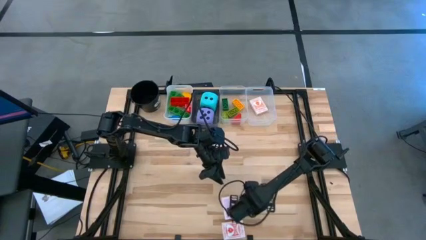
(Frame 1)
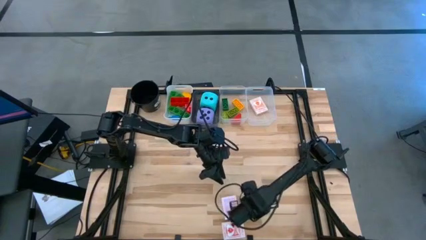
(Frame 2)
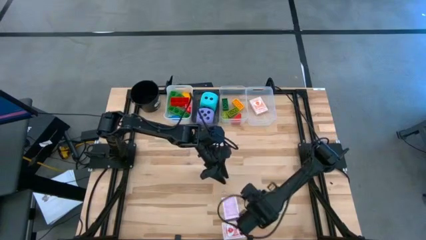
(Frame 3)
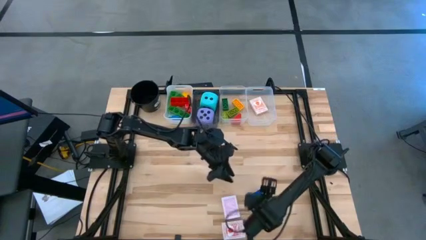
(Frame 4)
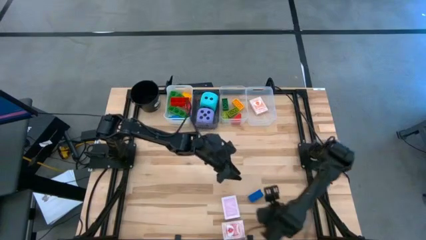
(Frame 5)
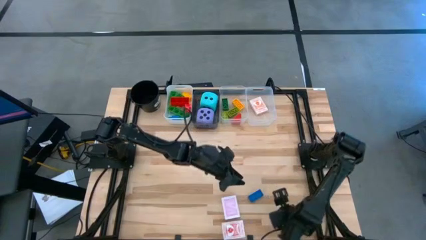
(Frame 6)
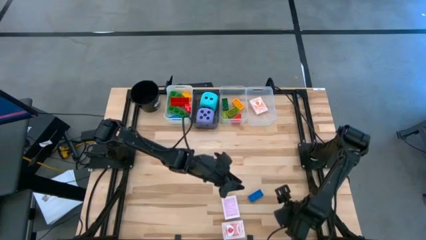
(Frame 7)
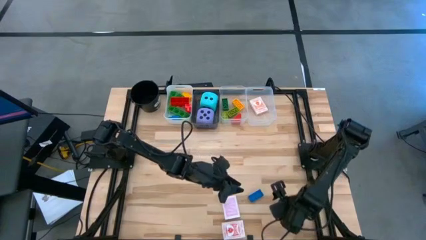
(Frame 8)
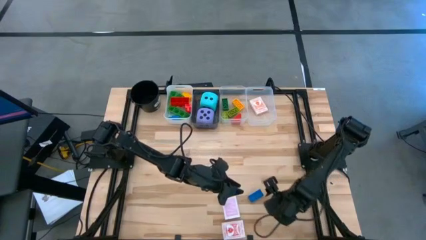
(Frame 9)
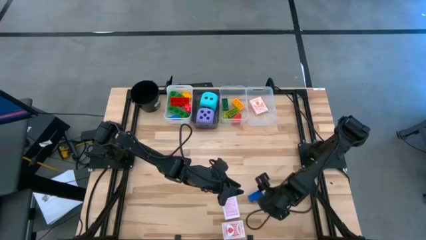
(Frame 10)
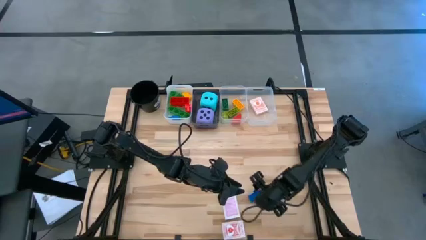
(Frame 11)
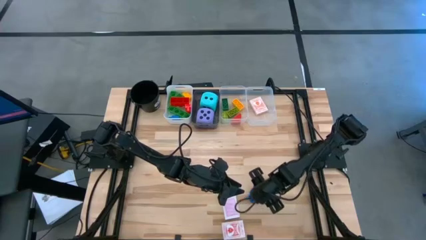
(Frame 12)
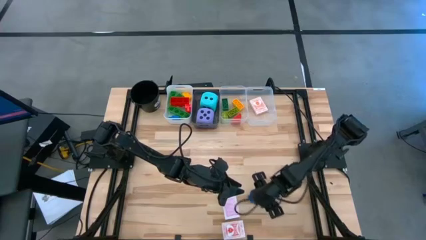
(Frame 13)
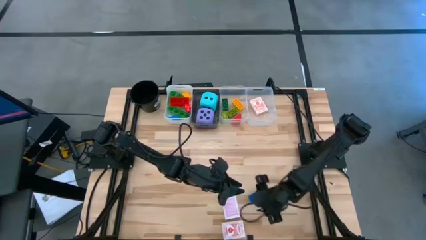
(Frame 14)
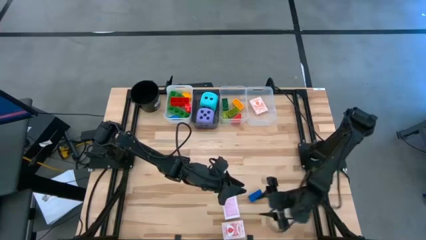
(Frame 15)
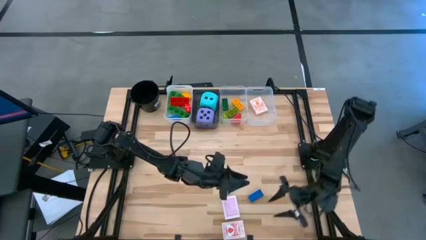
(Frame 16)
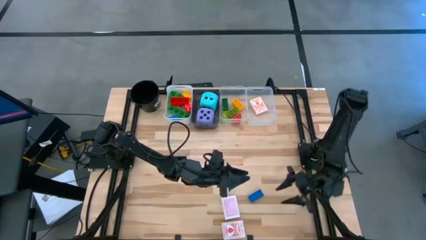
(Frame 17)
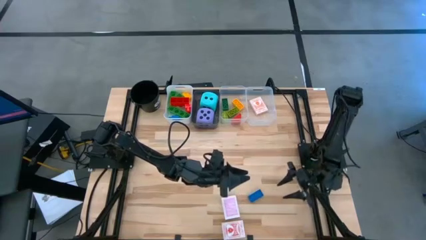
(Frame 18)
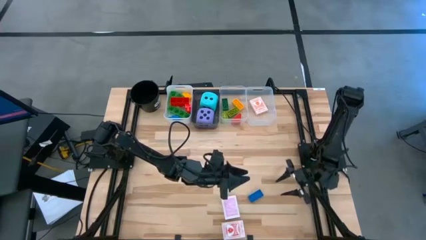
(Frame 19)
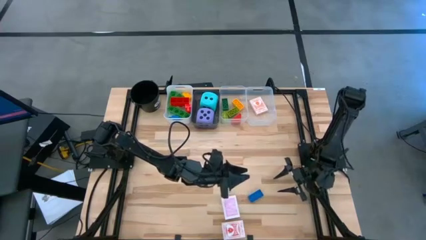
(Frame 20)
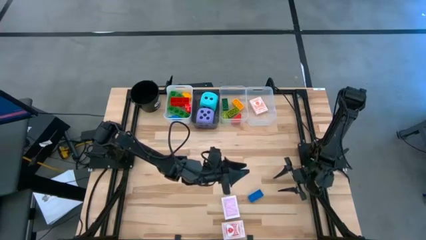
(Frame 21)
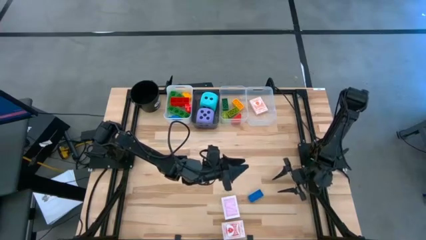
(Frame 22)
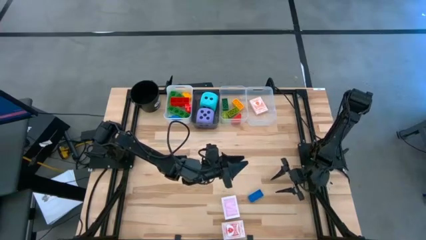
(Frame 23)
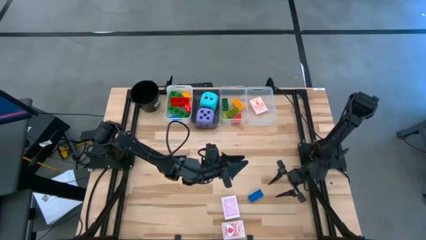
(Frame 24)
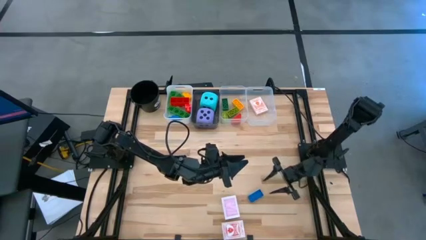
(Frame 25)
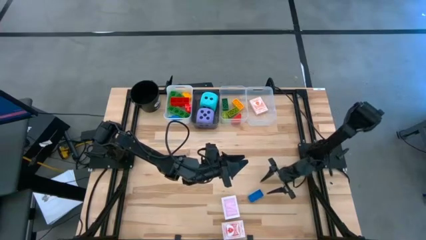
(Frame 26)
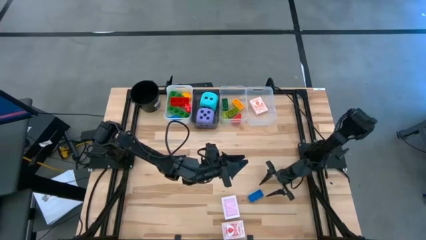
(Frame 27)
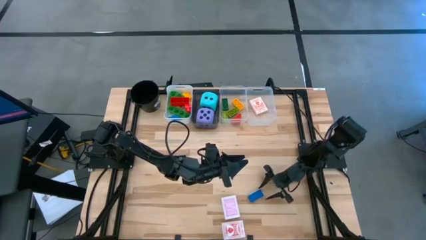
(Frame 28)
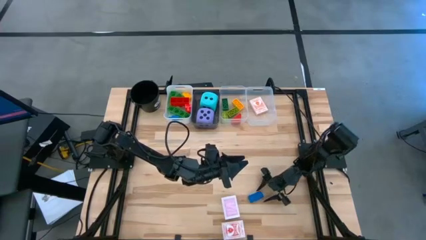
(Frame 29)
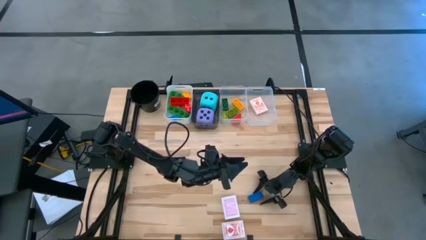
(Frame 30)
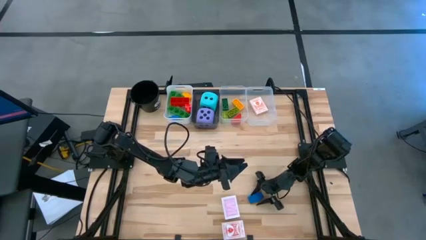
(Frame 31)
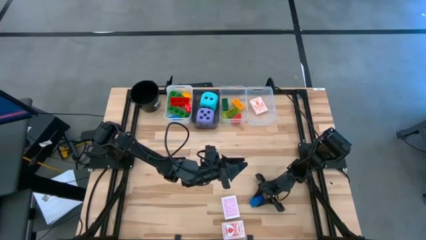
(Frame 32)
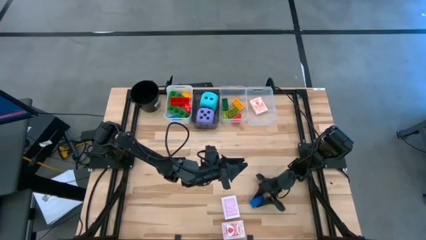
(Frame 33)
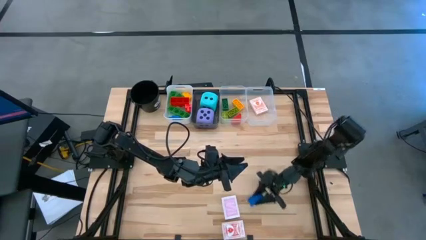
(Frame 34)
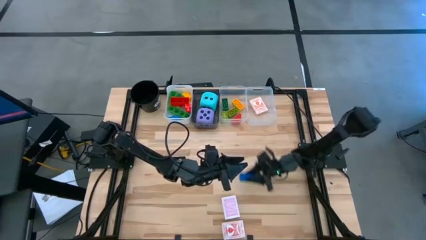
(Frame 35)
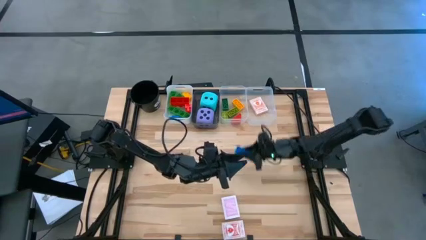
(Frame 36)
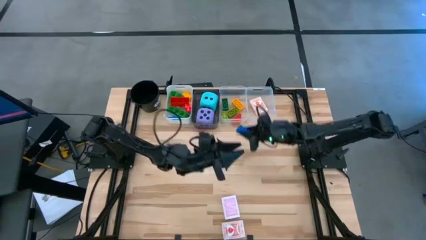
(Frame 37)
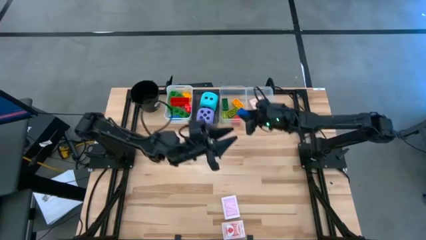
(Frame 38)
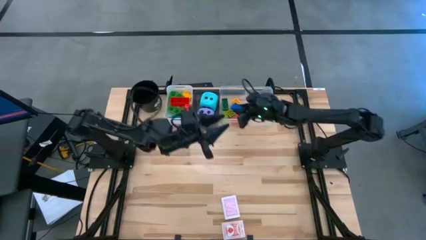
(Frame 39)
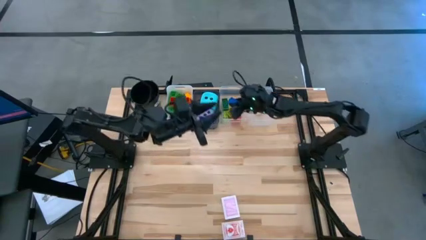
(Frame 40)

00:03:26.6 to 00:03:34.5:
Task: Pick & Place Toys
Put the small blue 8-stud game piece into the left transparent bin

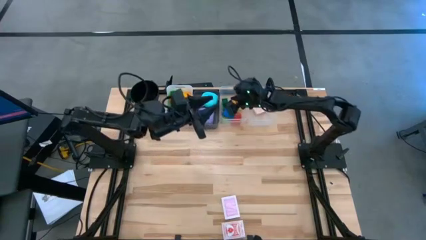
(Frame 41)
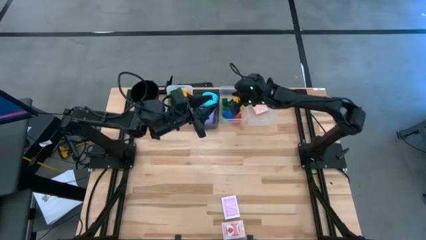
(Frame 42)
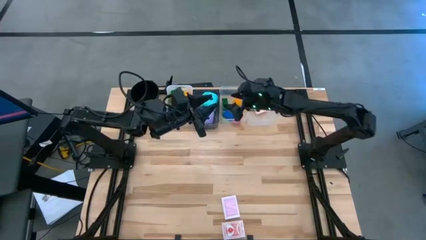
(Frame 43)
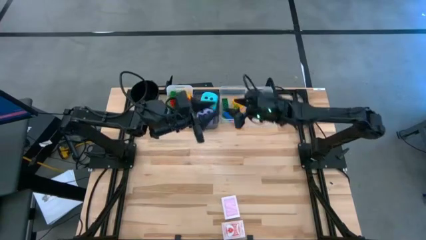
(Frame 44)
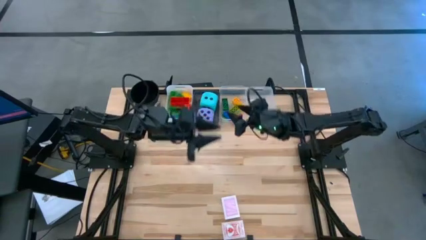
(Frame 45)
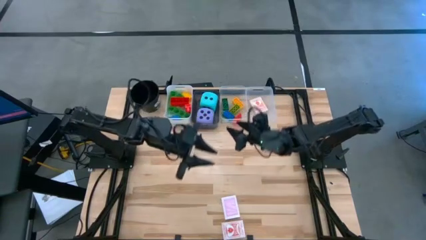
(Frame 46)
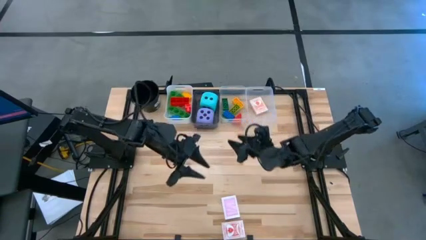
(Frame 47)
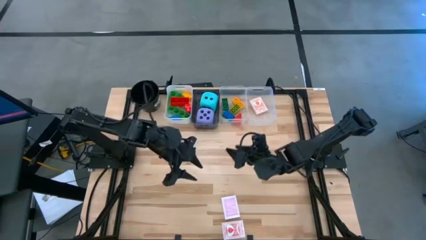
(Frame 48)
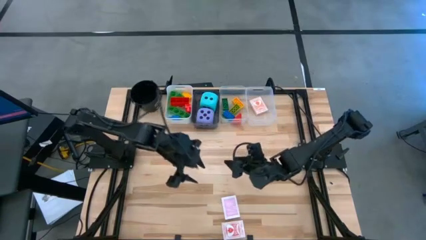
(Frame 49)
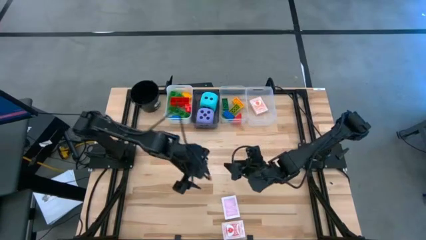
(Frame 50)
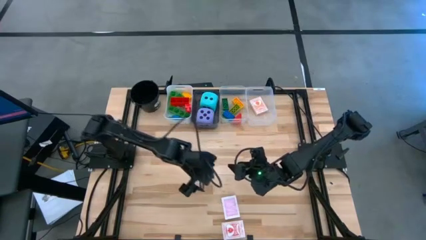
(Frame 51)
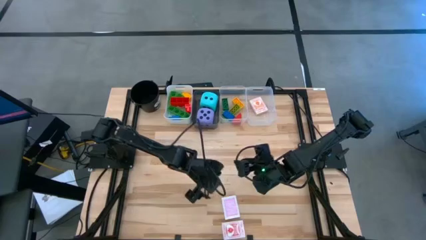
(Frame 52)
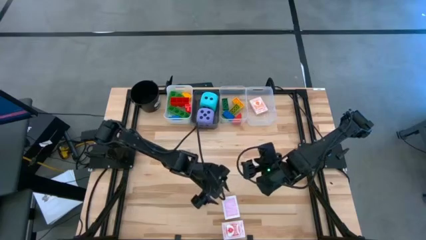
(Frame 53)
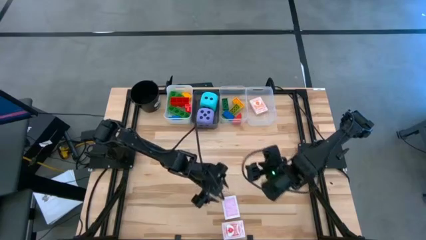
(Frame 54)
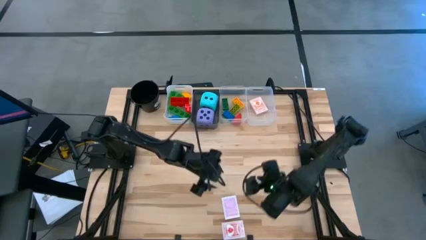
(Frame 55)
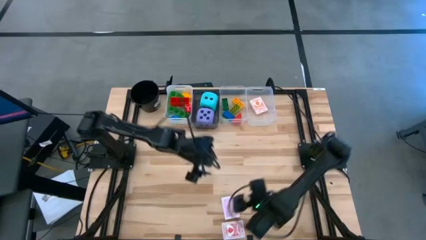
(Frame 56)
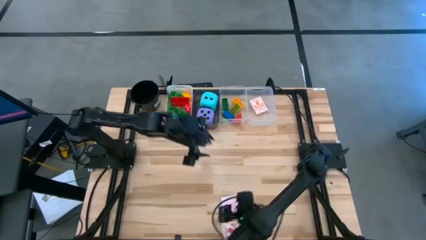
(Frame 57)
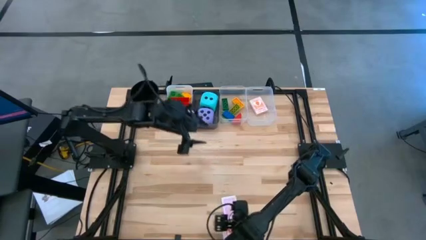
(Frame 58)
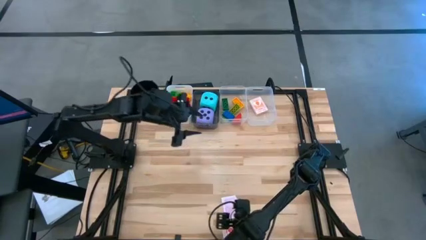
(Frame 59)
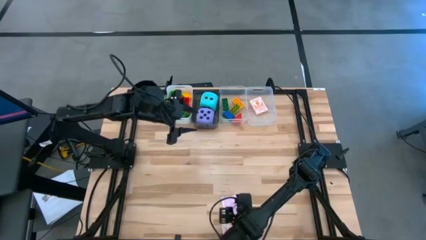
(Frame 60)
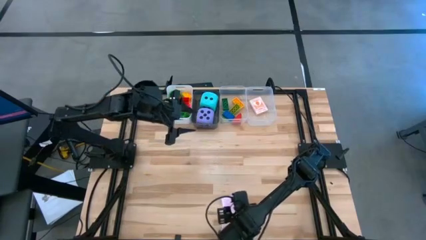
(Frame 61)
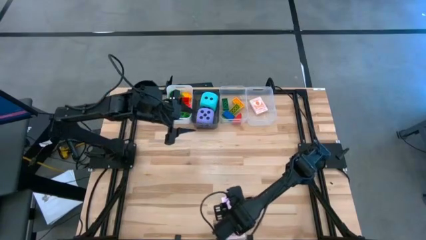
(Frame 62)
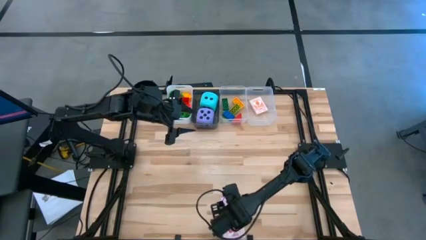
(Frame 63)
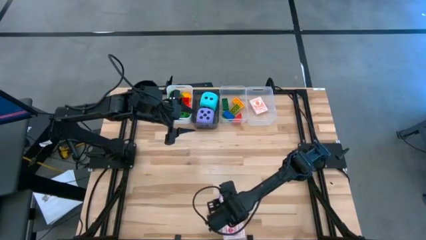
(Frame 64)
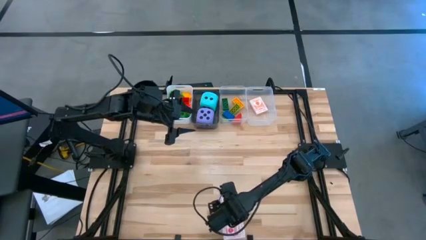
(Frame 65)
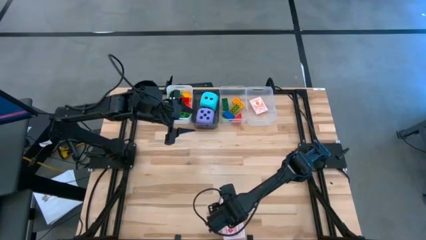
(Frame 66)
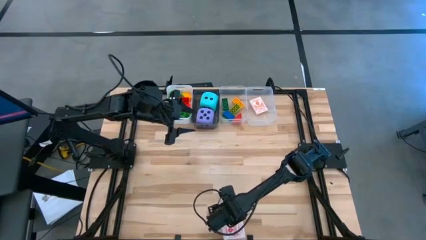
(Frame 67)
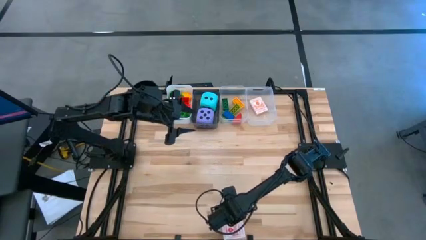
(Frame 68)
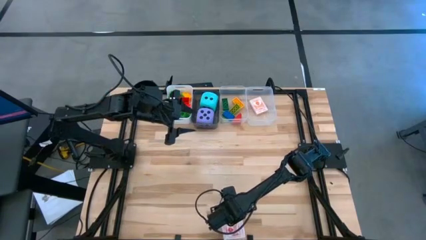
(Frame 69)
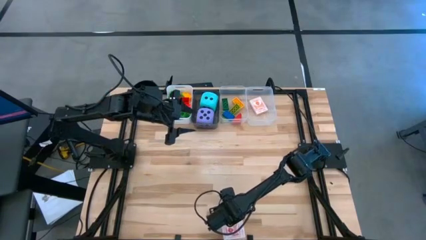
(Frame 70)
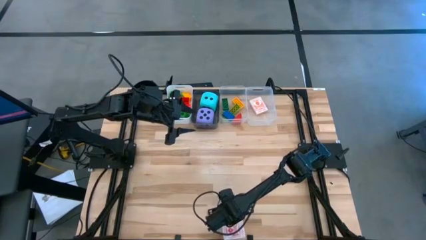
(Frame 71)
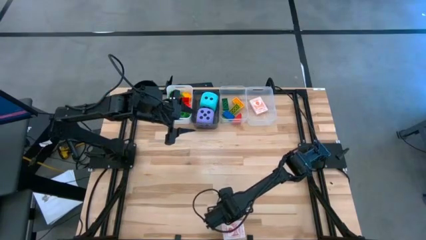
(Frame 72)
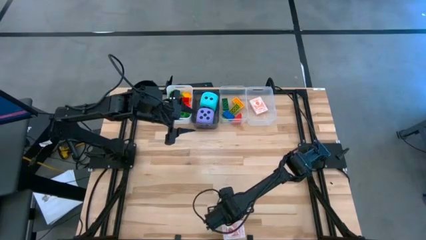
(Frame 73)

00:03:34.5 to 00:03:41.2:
Put the pink deck of cards into the right transparent bin
